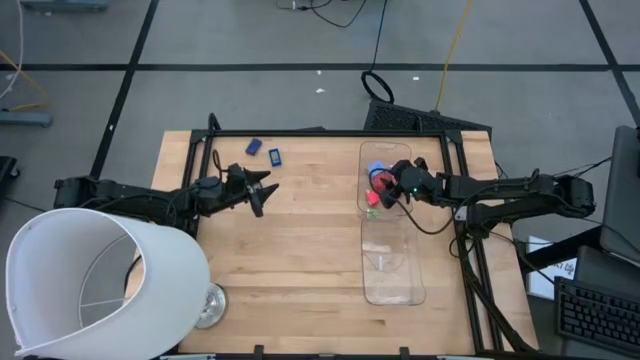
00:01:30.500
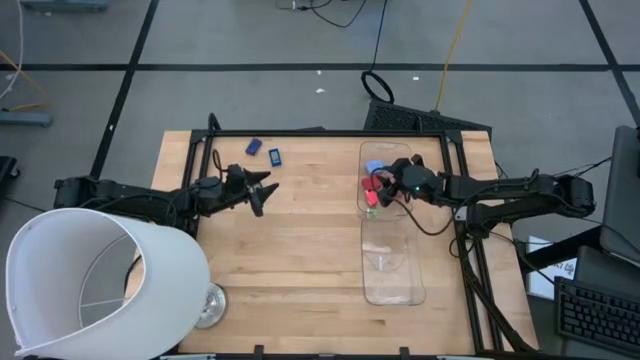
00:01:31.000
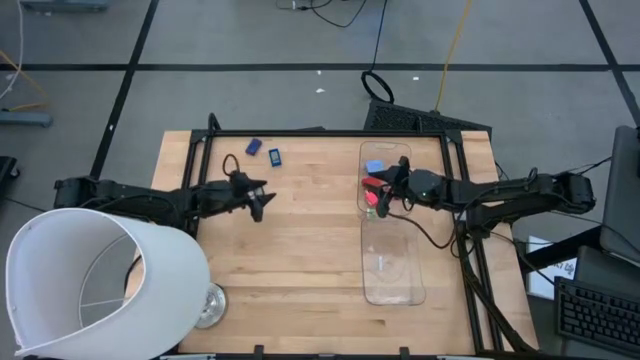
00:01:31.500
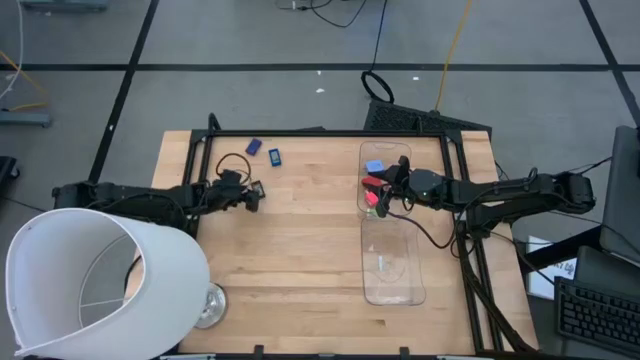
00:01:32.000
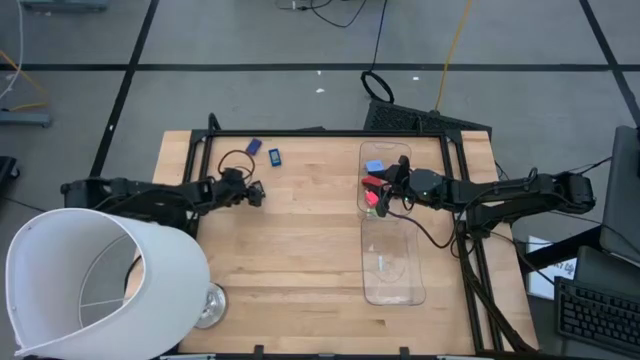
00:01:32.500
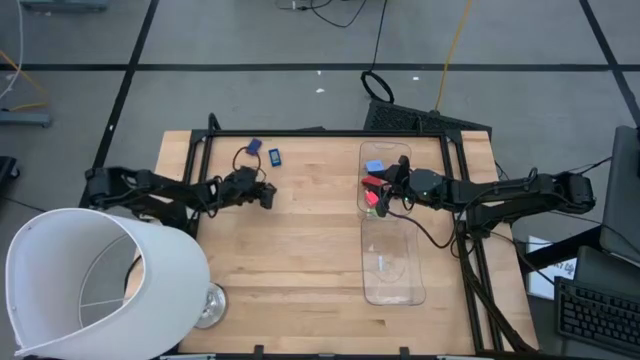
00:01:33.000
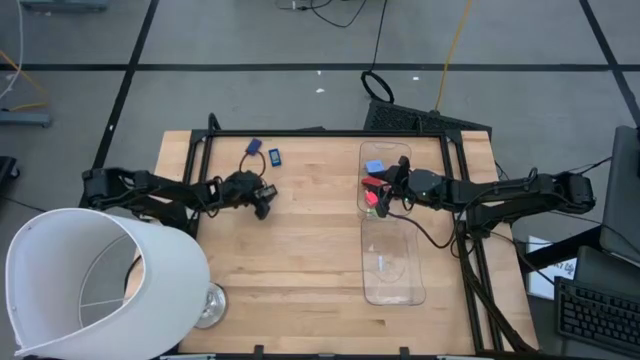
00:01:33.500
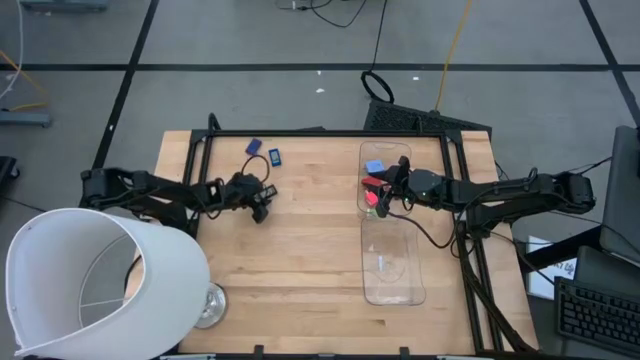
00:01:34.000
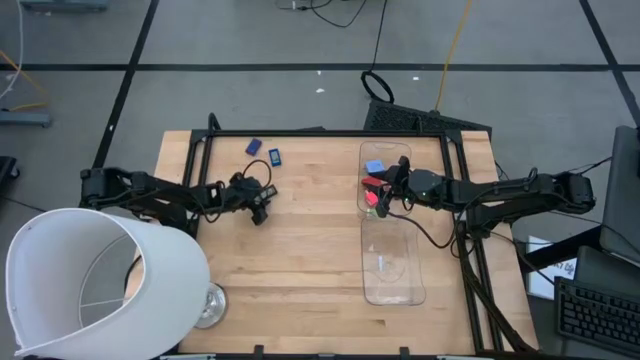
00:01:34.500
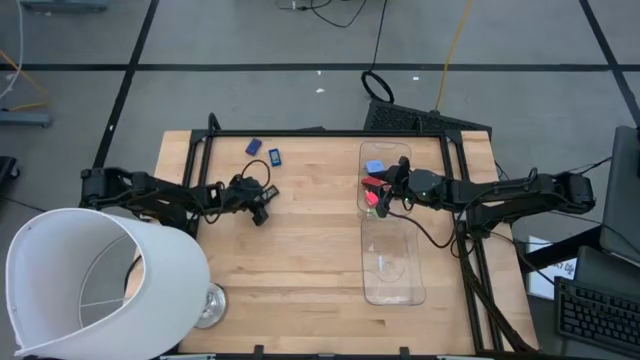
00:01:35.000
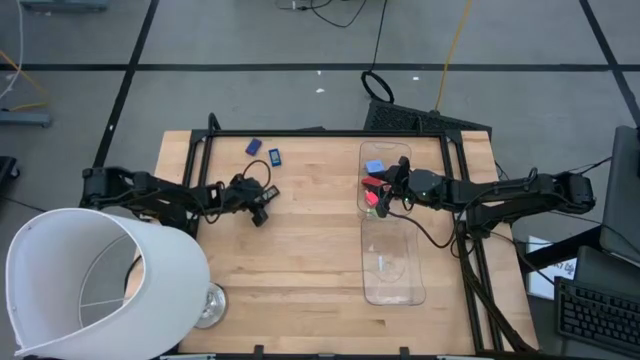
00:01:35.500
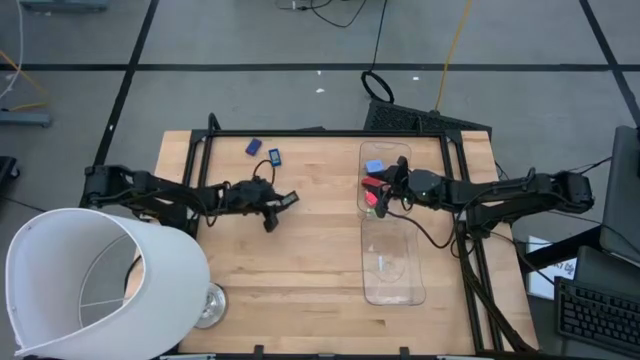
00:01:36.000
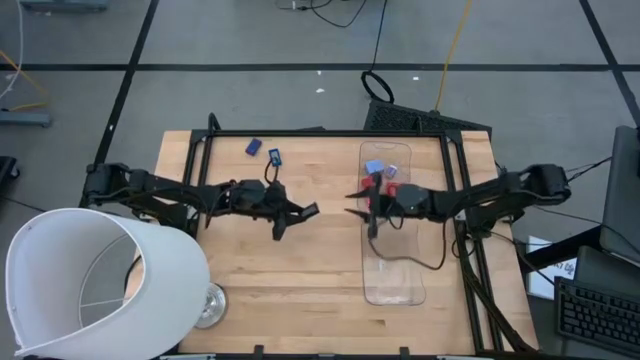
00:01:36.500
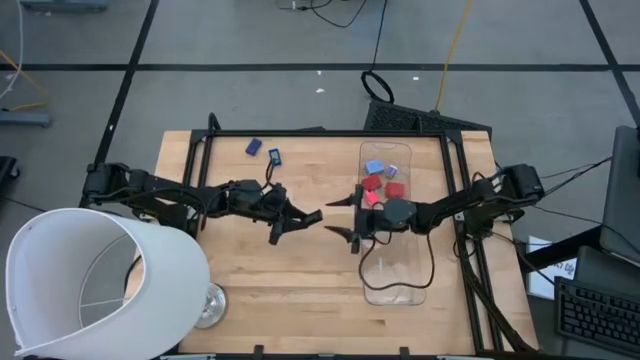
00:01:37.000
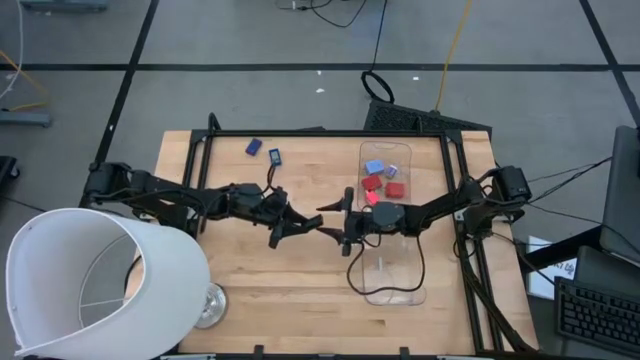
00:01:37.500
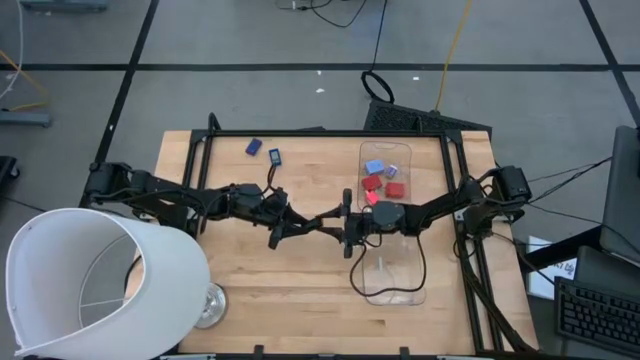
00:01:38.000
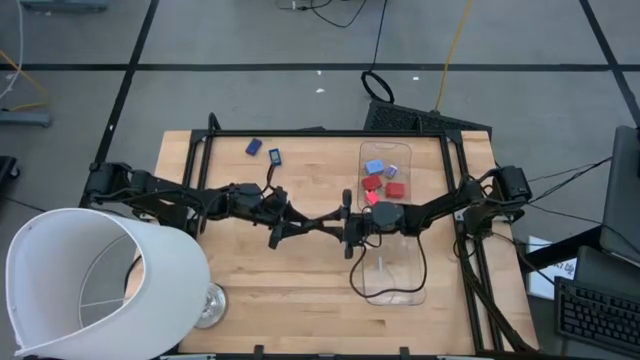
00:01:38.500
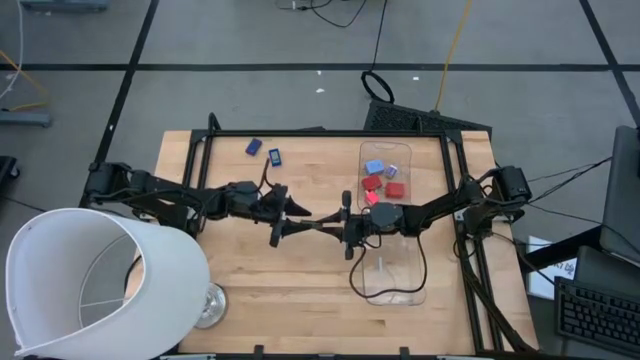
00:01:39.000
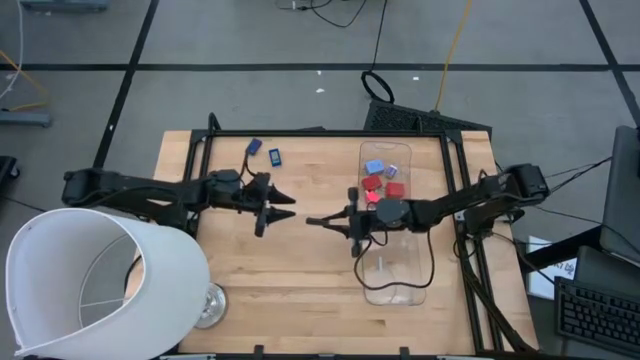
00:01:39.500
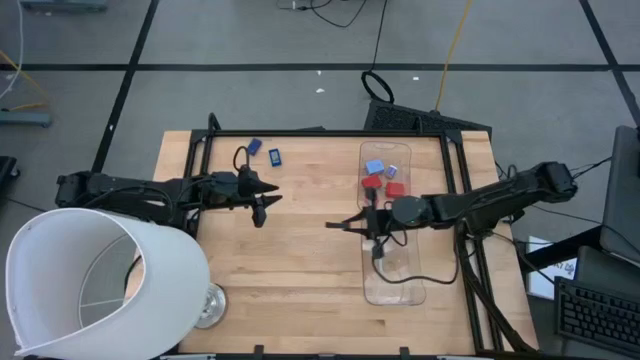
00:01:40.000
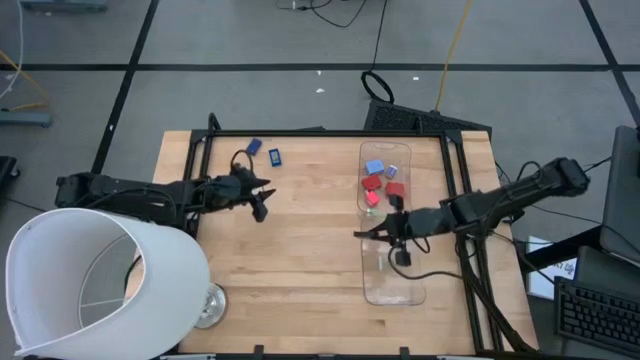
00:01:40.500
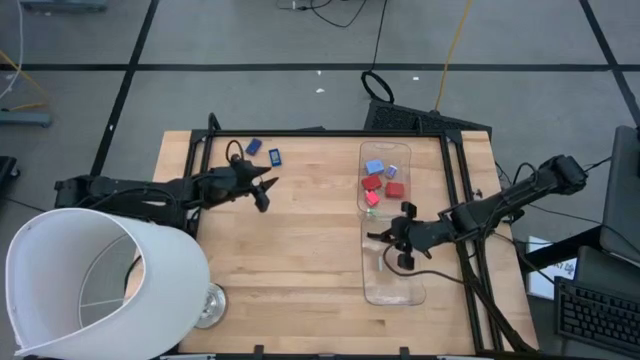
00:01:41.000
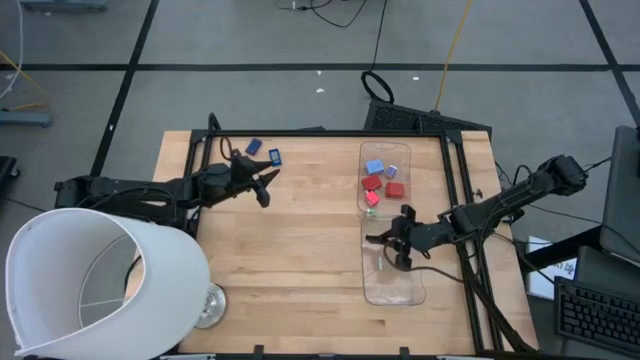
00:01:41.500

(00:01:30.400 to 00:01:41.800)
Task: Pick & Place Office items
Put the black digital clock into the bottom transparent bin

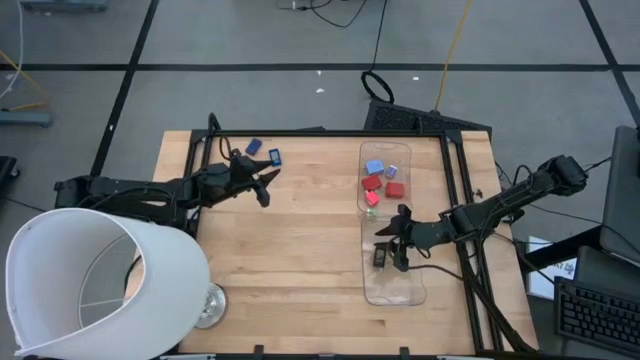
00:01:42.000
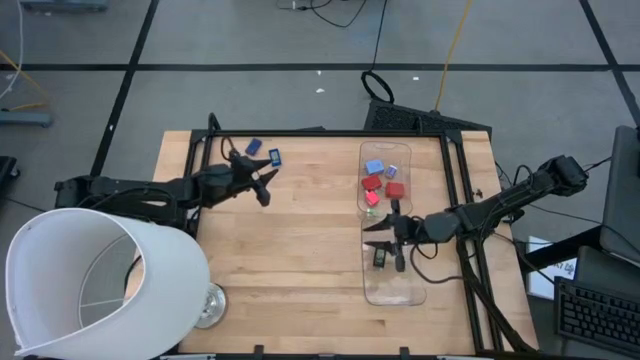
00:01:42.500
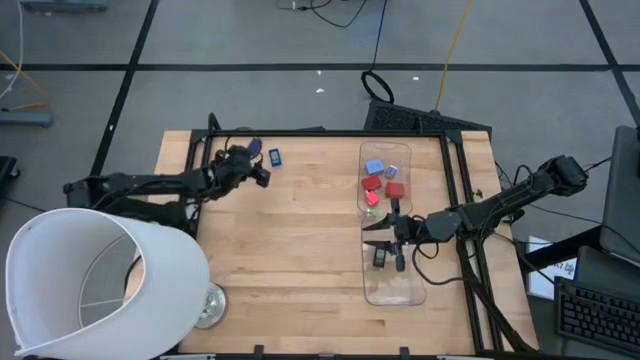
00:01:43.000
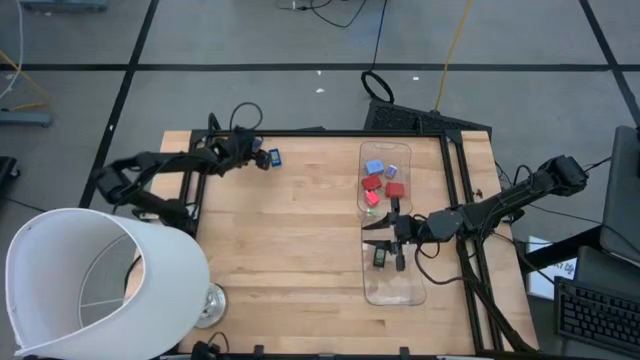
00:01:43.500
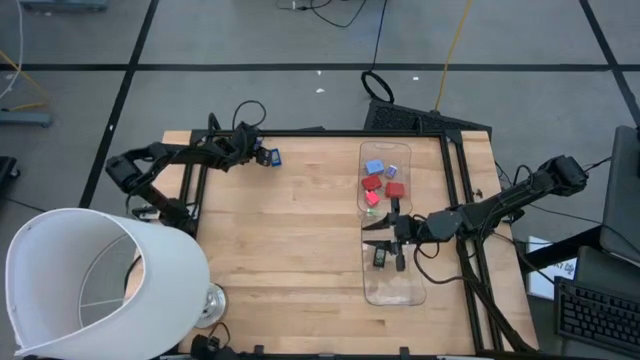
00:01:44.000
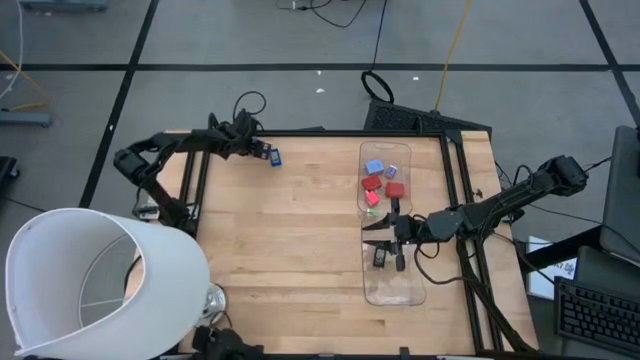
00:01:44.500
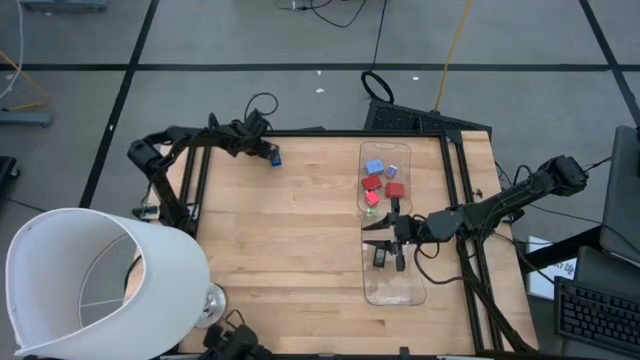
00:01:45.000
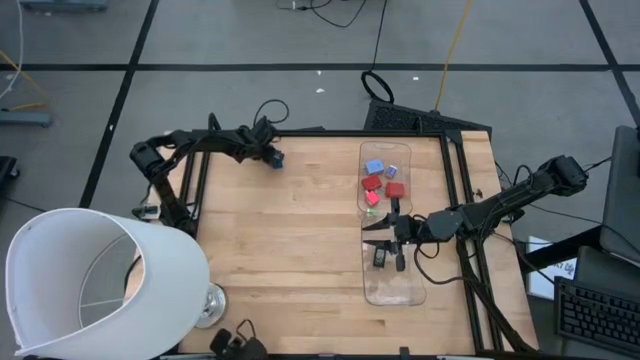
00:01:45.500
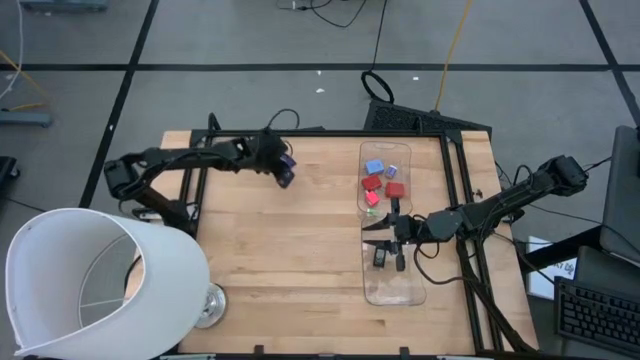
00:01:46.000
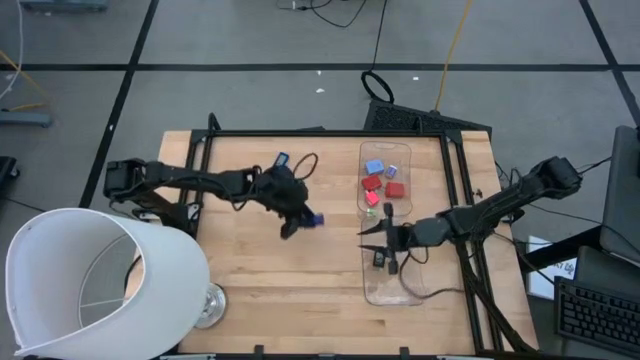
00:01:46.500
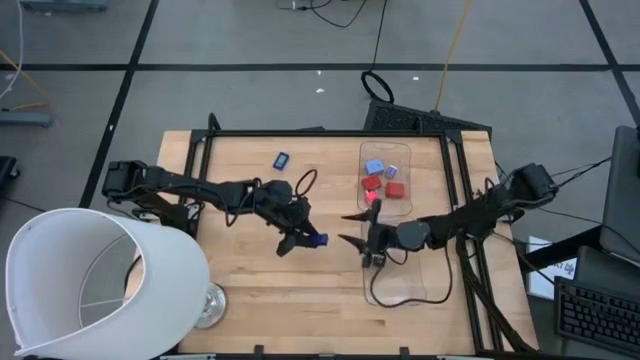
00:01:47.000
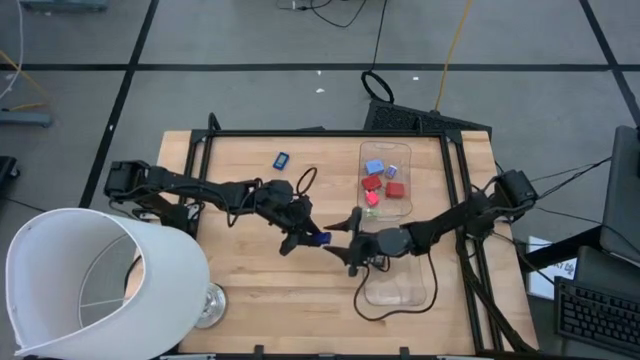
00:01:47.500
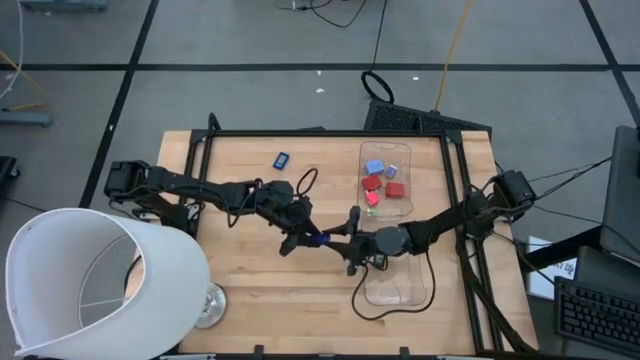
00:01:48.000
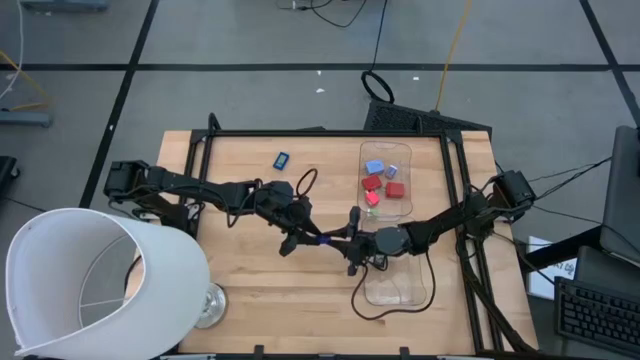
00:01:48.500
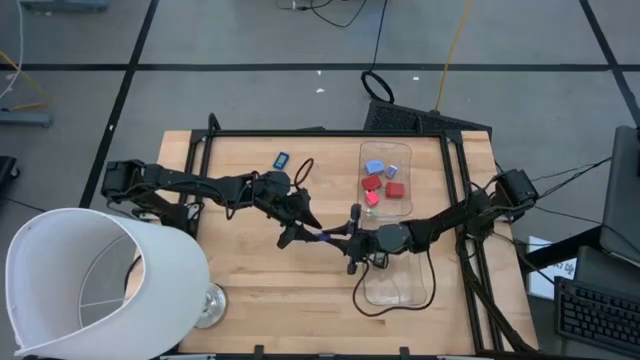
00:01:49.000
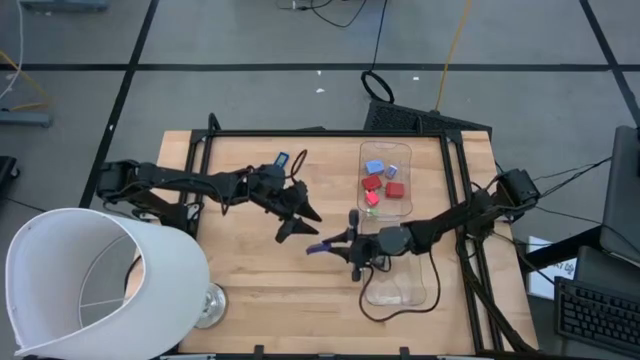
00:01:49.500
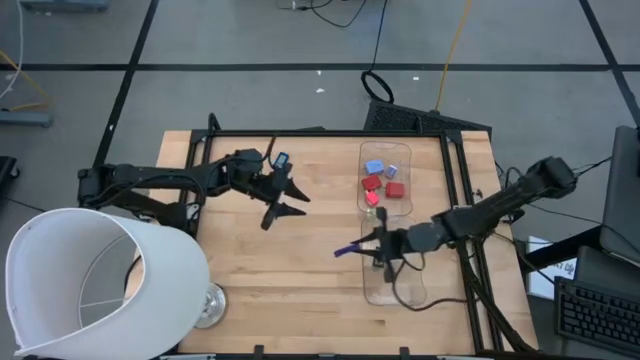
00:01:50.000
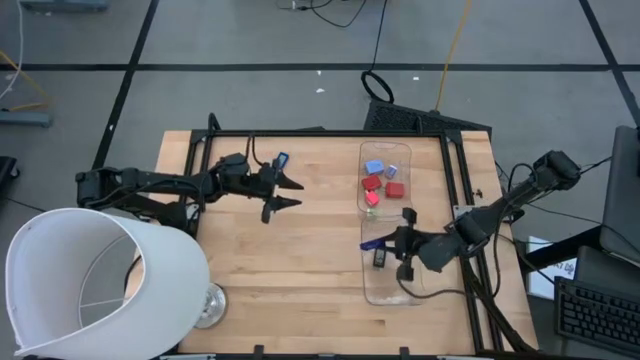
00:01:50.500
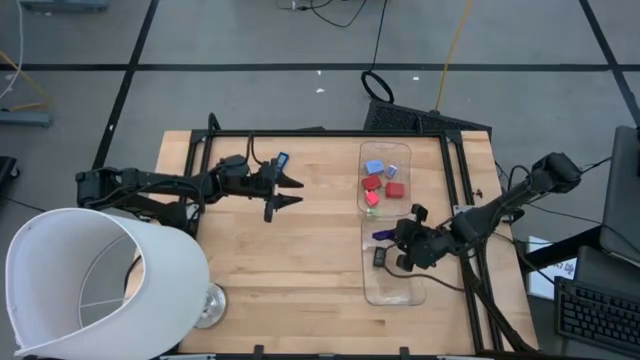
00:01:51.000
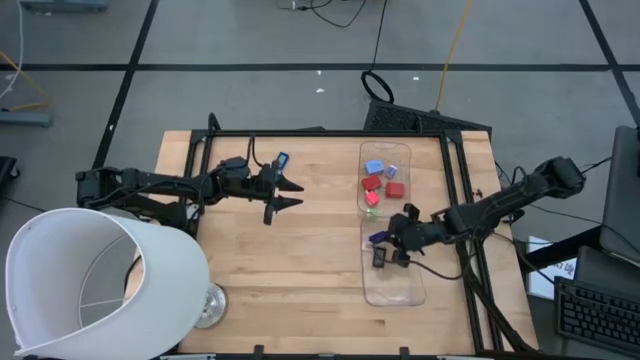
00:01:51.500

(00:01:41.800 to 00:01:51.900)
Put the top blue digital clock into the bottom transparent bin

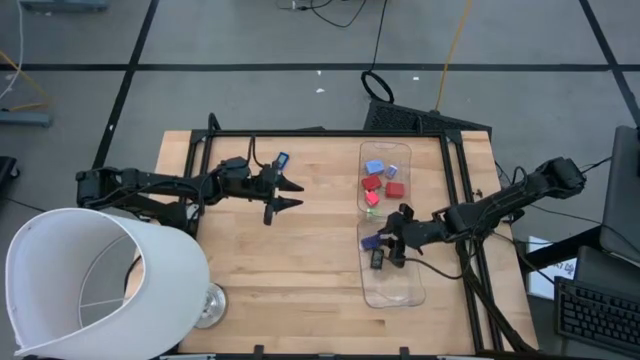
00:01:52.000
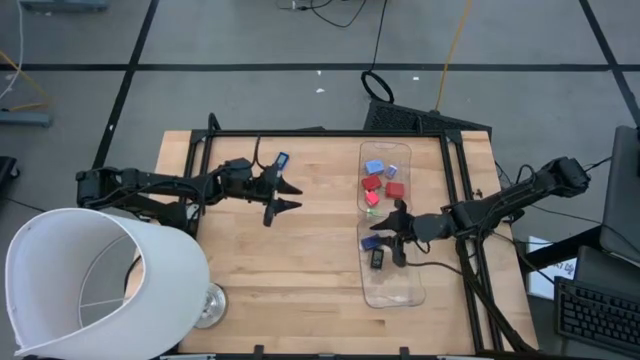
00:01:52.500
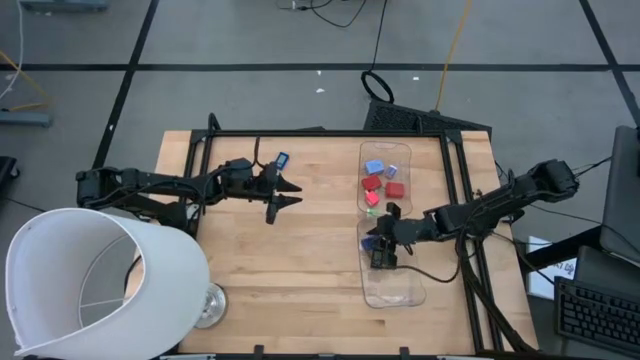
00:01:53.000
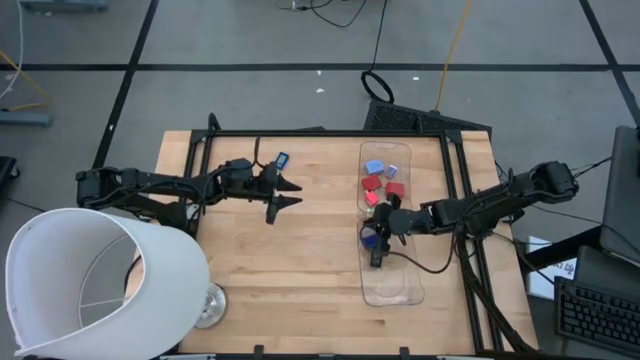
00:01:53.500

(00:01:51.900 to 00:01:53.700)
Adjust the bottom transparent bin
